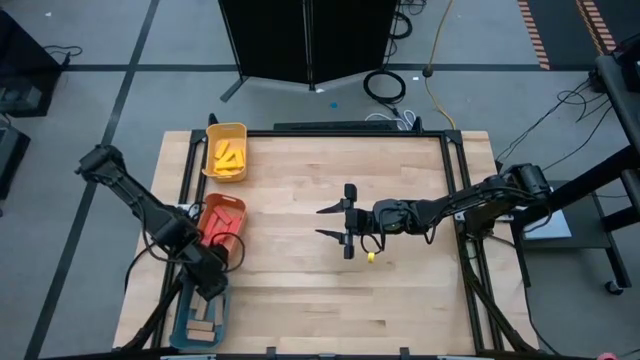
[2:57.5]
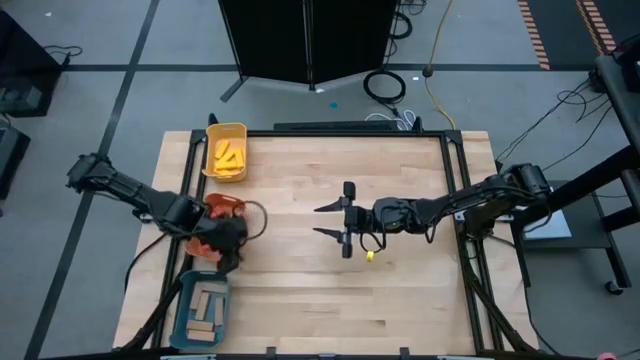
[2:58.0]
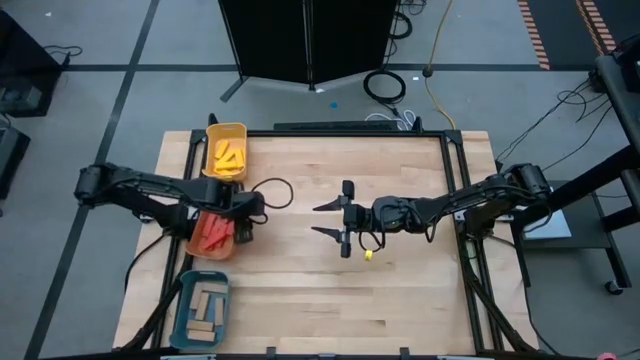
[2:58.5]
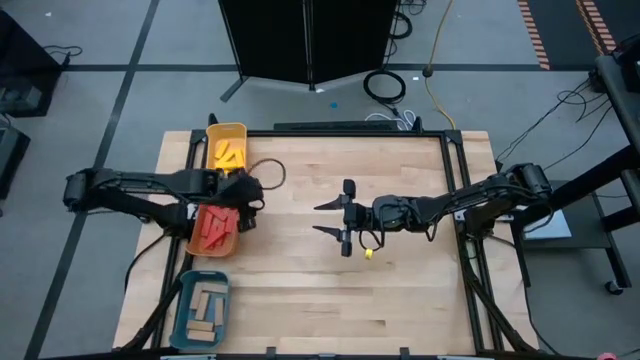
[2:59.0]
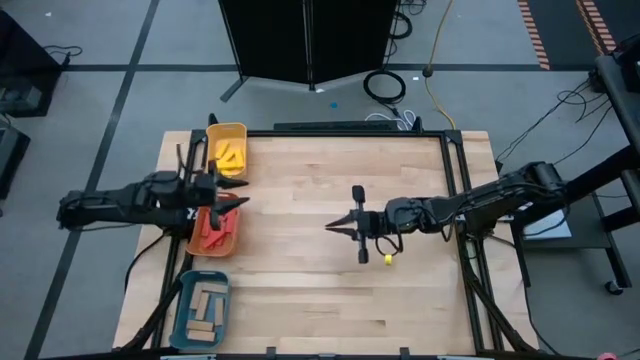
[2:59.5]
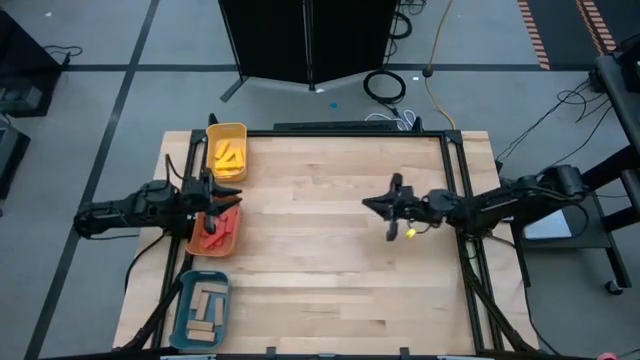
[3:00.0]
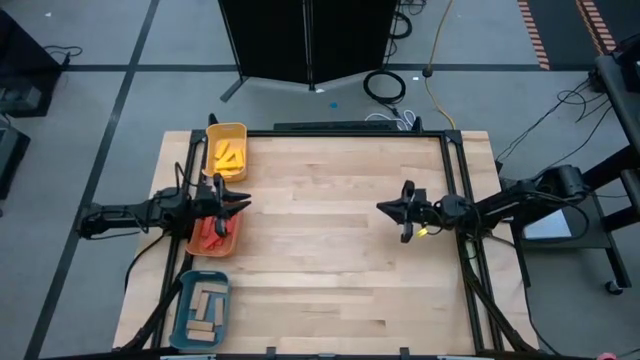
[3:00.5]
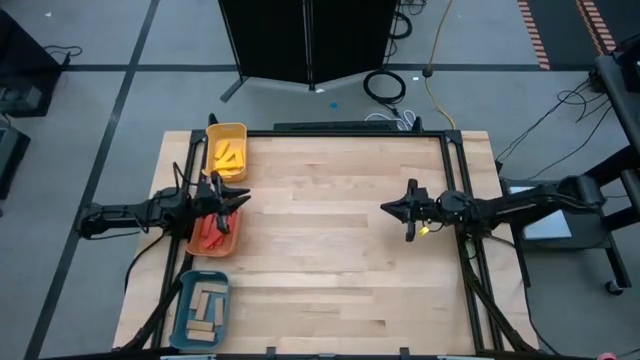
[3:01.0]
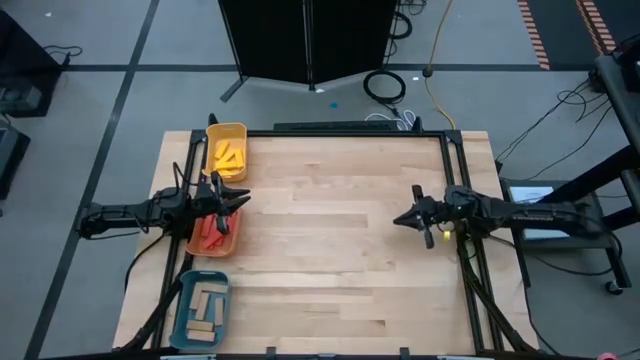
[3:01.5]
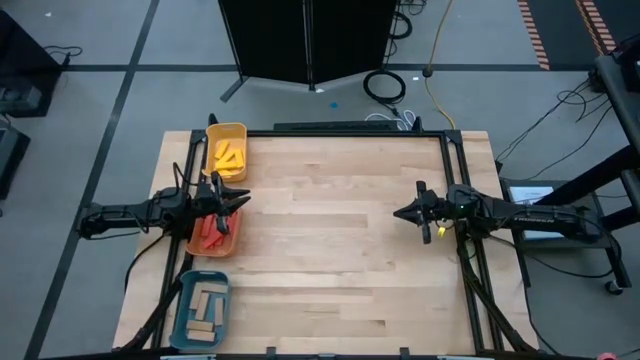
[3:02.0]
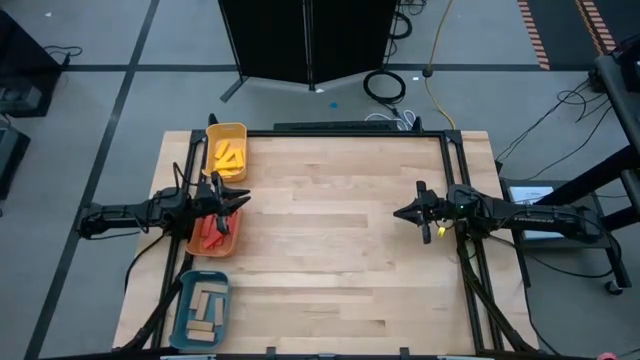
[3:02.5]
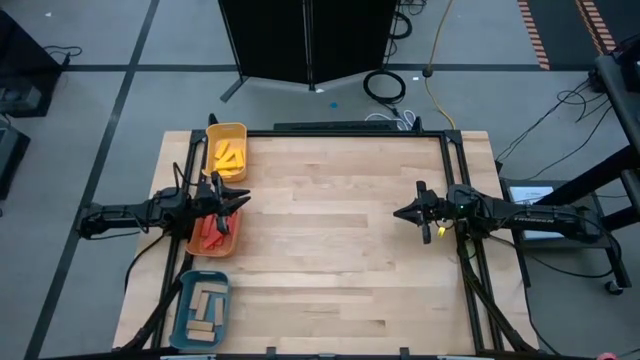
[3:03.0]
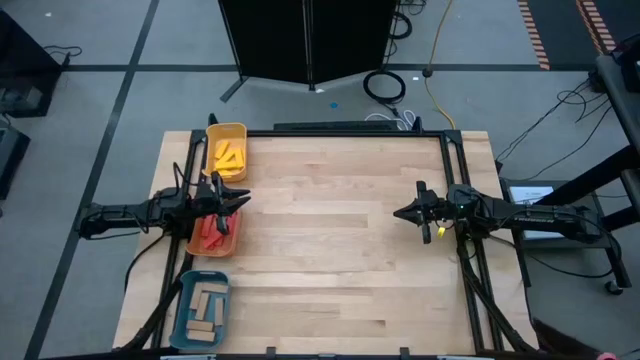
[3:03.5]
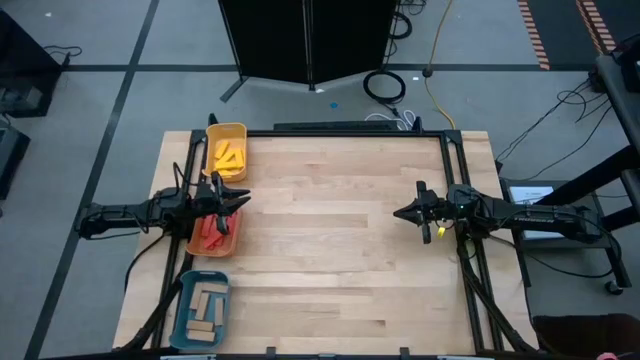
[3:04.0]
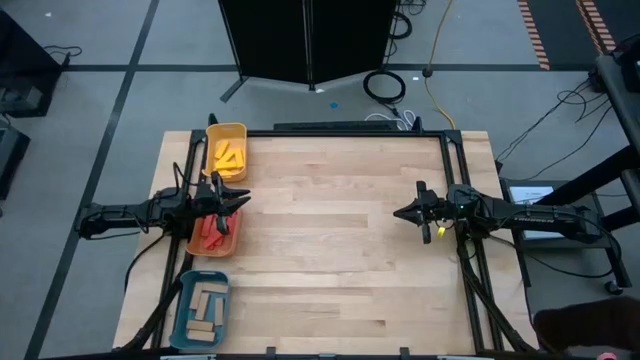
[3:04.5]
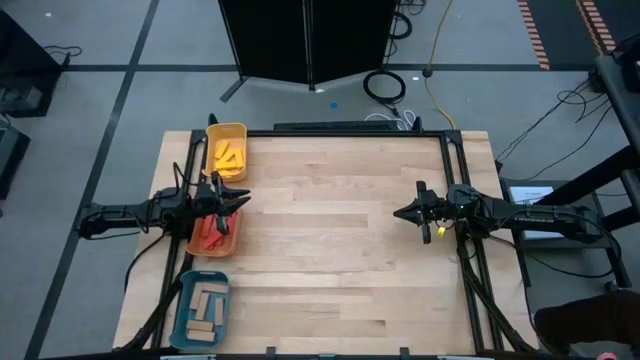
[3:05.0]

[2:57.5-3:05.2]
Task: Sort blocks
Return to Home Position

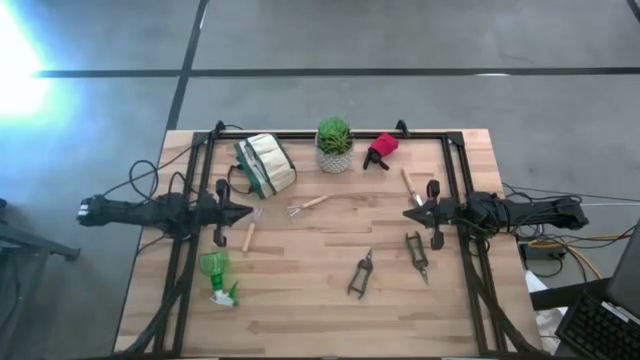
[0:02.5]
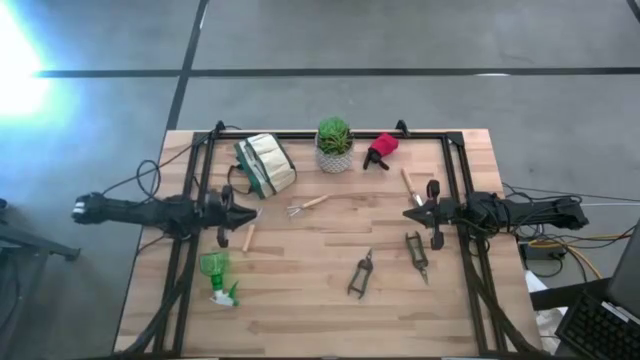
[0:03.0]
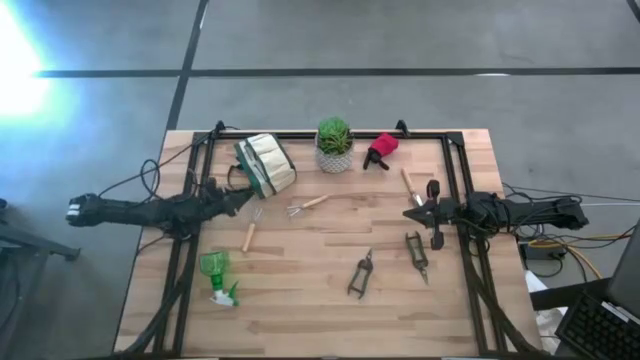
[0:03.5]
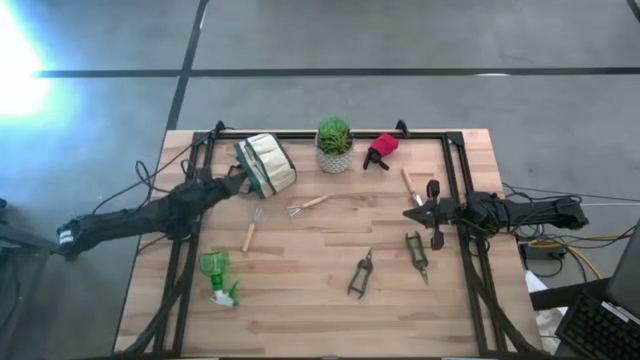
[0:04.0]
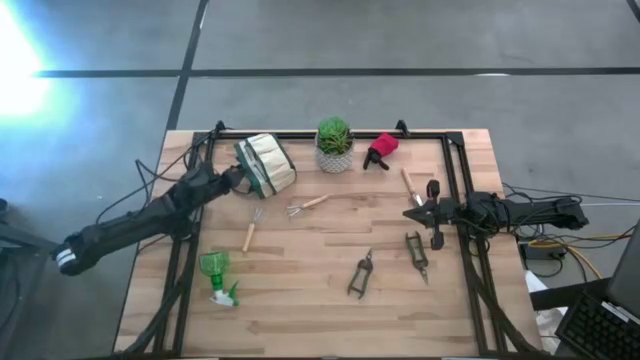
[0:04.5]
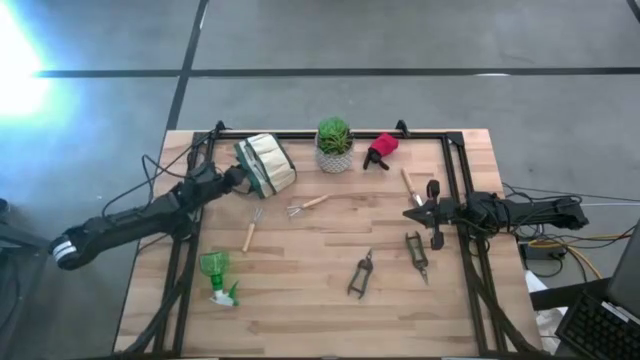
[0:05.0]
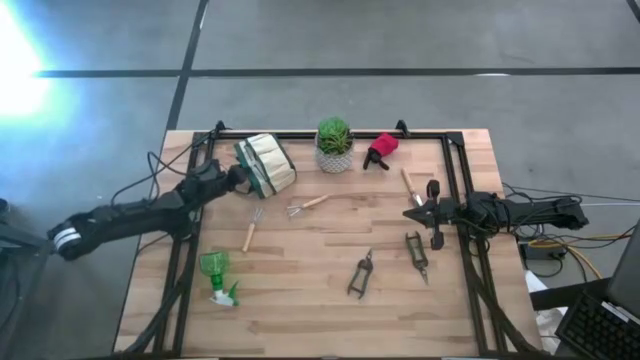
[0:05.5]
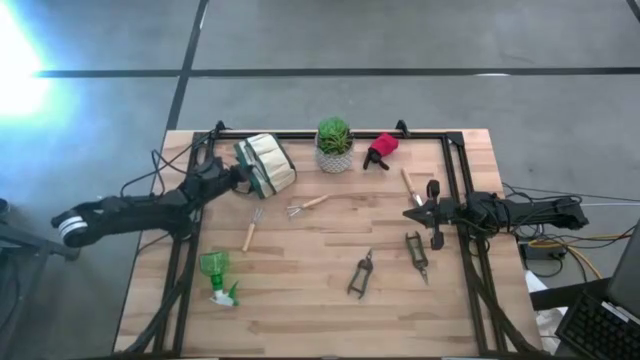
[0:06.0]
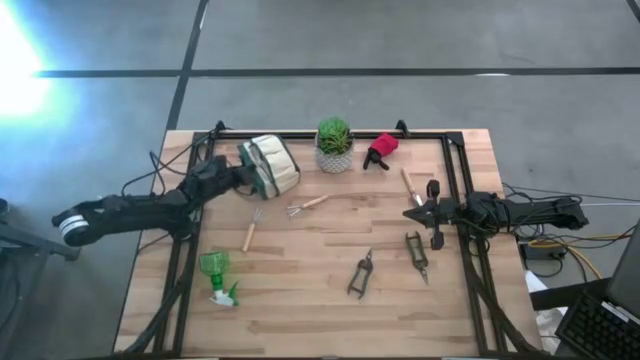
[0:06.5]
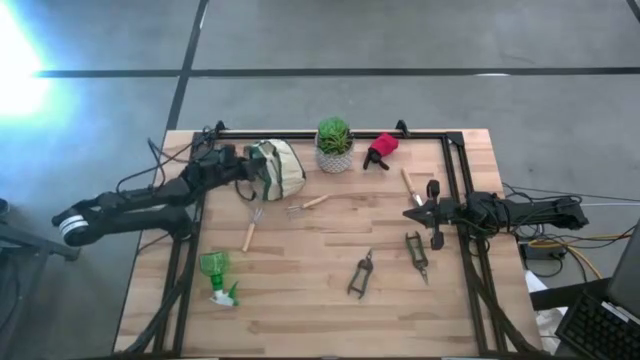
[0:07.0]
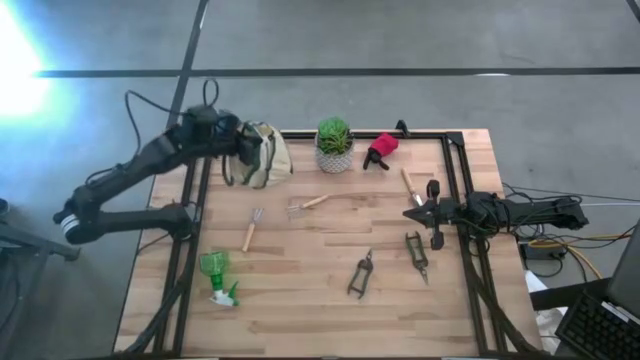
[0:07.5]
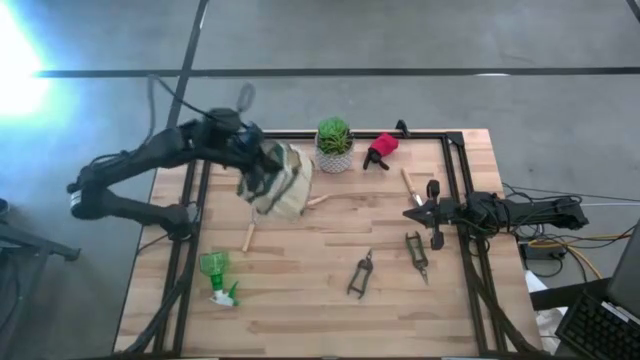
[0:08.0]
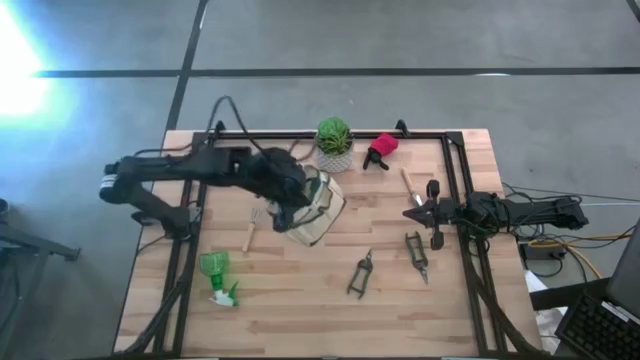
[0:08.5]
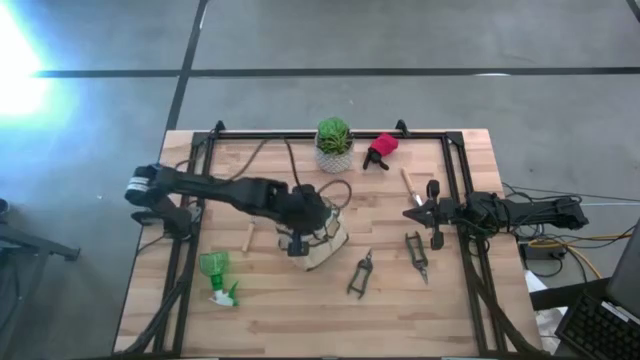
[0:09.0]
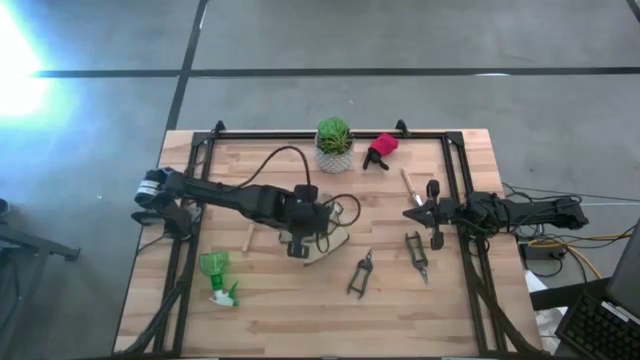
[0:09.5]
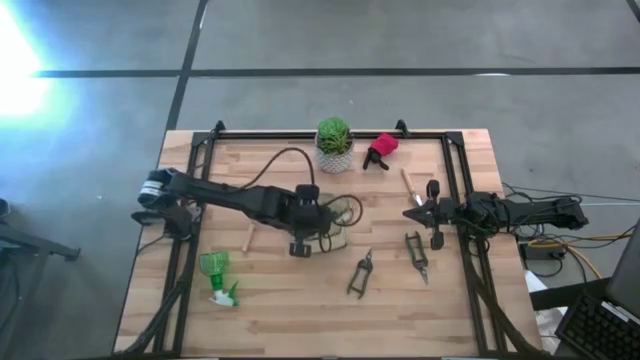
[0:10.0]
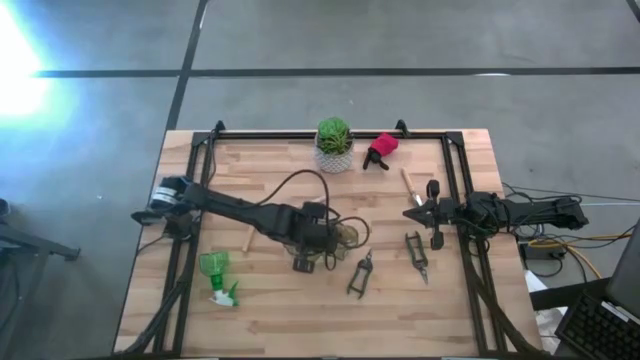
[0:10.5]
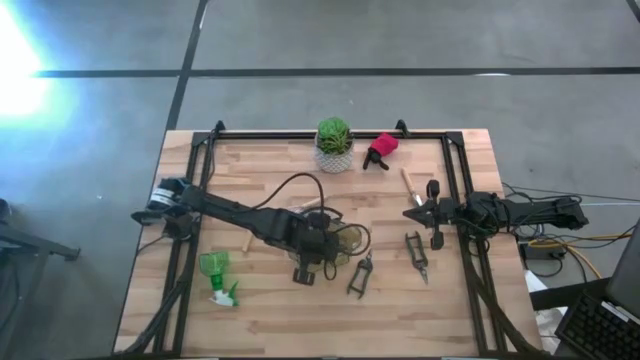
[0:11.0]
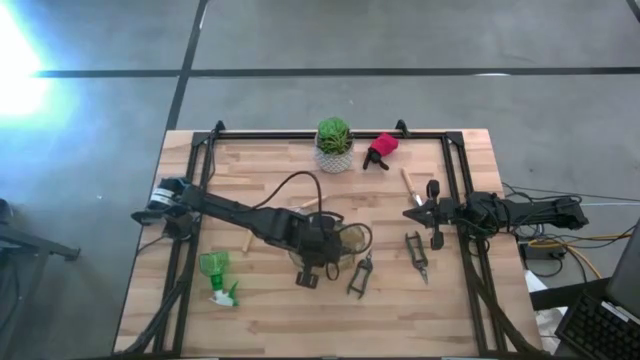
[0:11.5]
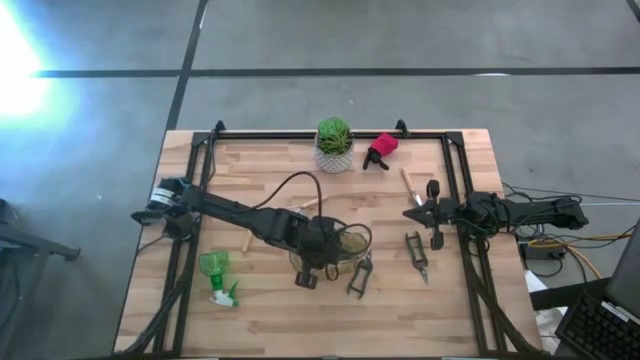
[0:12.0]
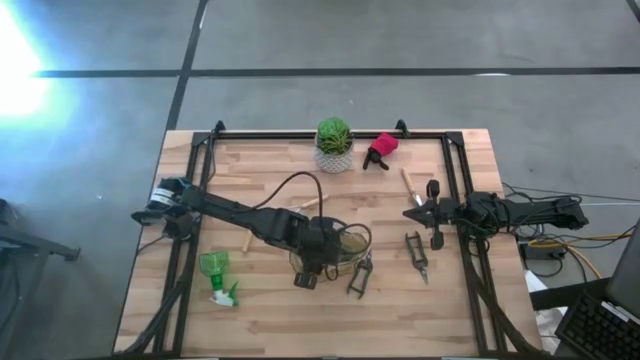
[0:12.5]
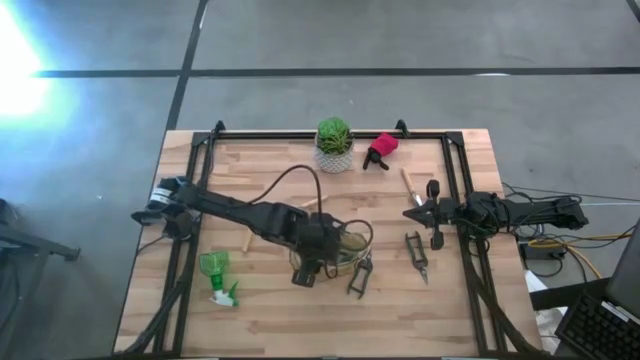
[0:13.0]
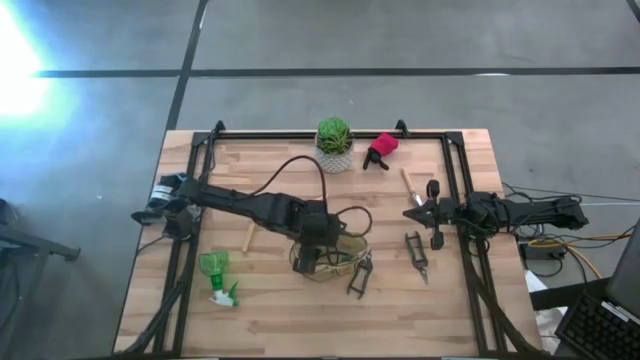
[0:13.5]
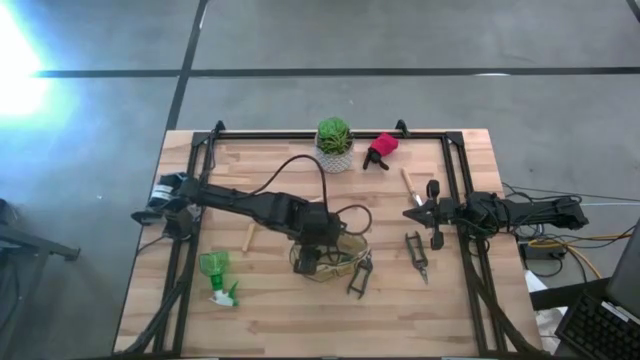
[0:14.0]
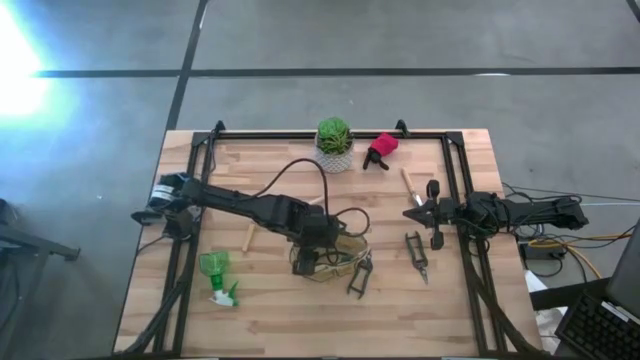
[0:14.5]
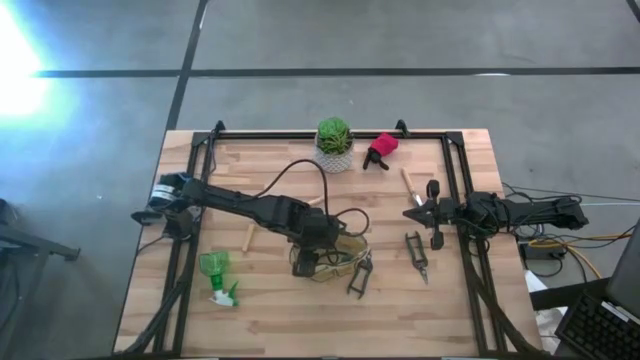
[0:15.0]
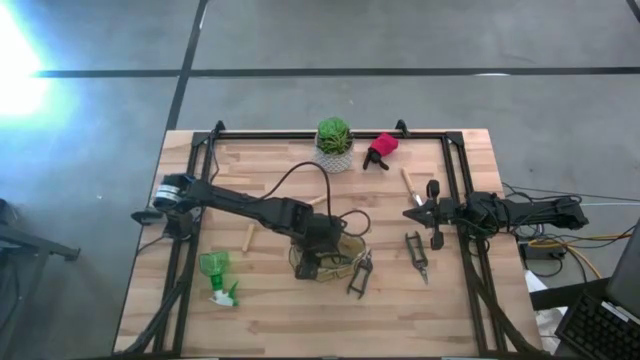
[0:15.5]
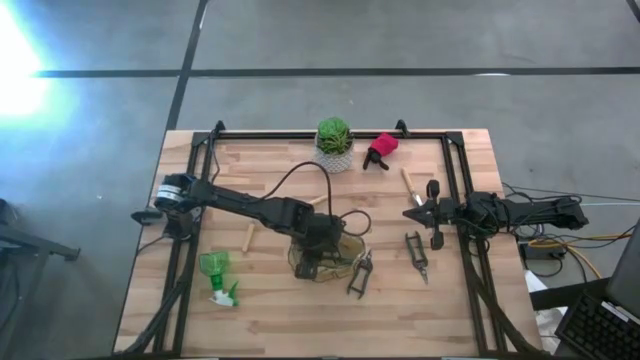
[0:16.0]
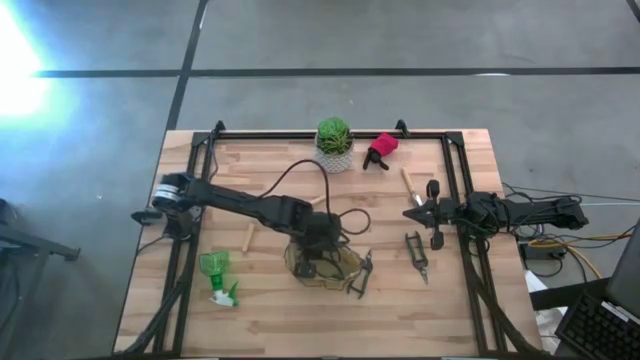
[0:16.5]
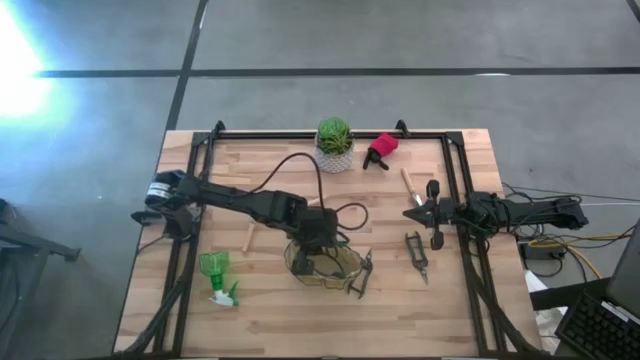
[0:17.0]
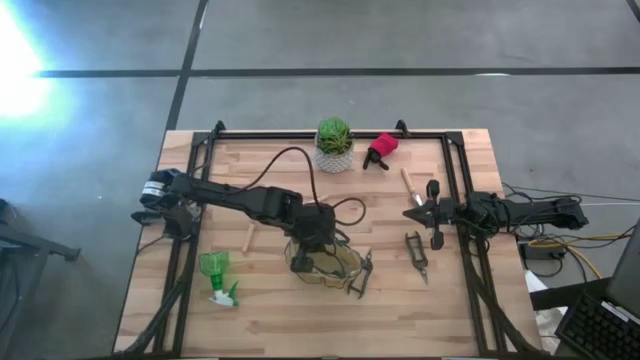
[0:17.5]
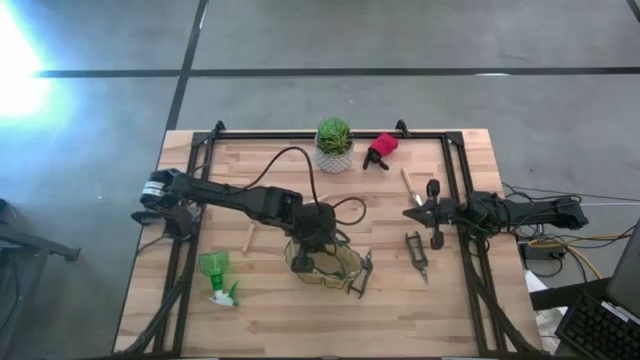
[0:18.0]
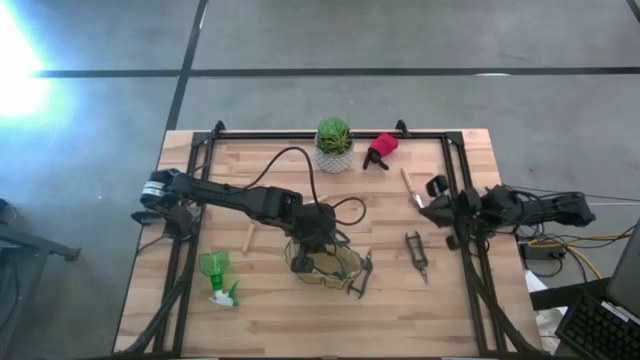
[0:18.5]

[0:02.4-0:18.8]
Task: Pick & Place Garden tools in Gardening bag
Move the white gardening bag to the center of the table
